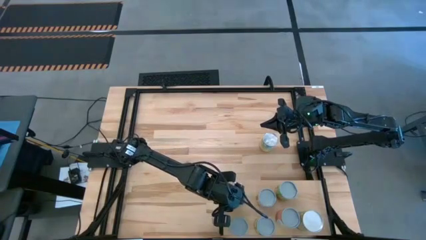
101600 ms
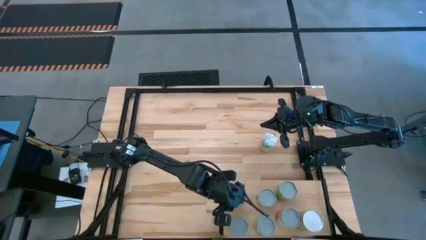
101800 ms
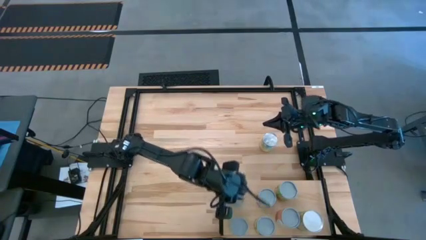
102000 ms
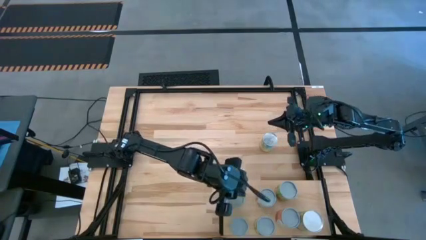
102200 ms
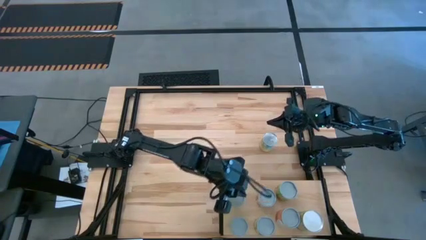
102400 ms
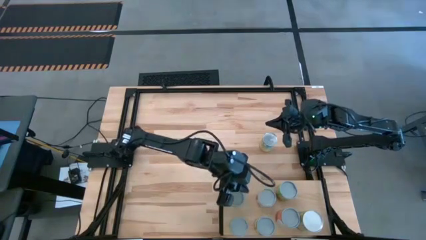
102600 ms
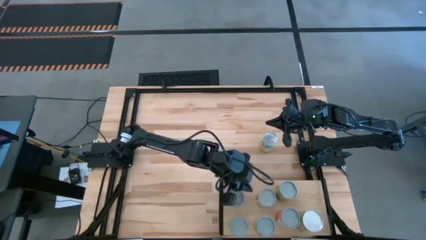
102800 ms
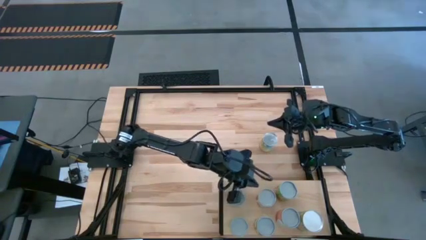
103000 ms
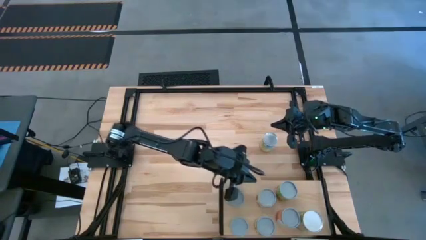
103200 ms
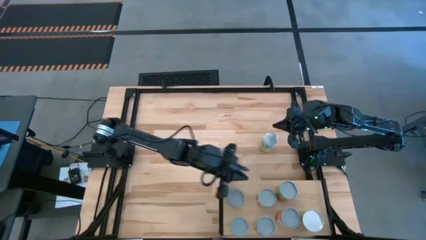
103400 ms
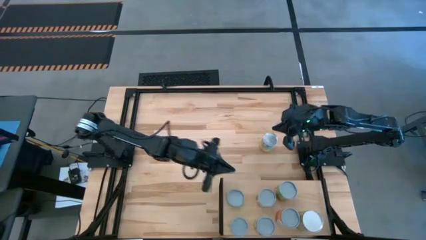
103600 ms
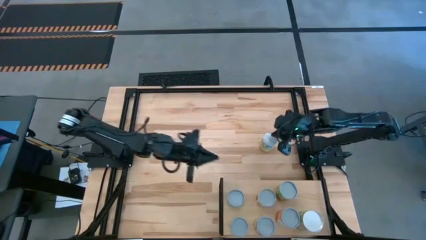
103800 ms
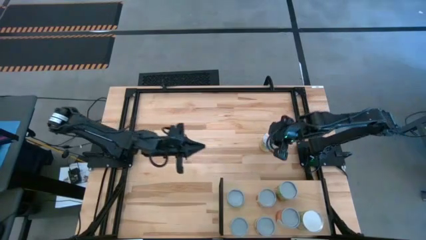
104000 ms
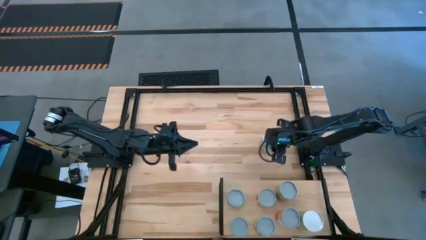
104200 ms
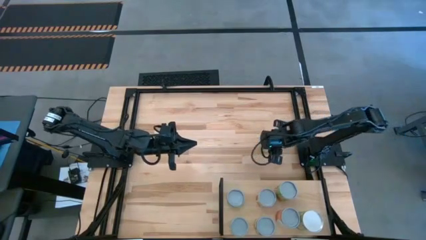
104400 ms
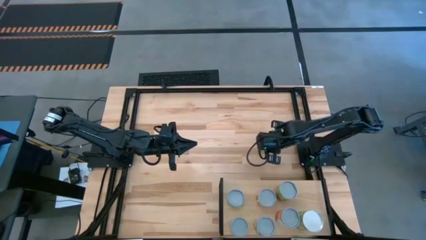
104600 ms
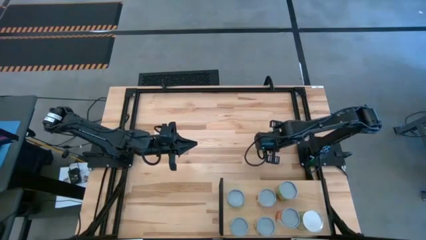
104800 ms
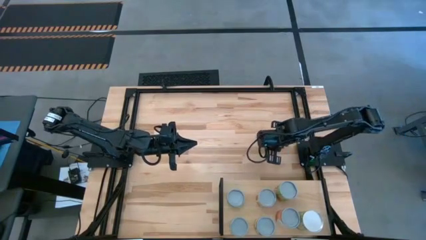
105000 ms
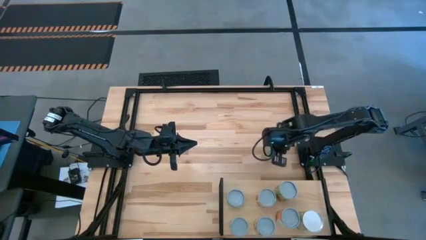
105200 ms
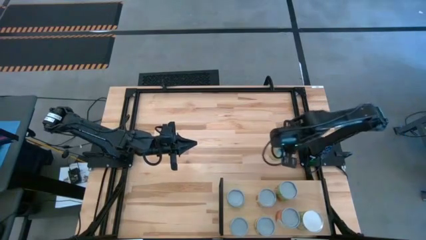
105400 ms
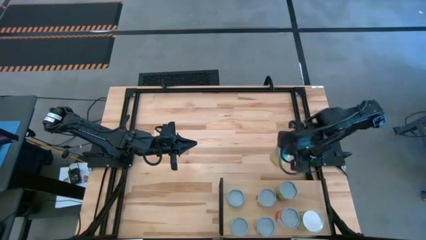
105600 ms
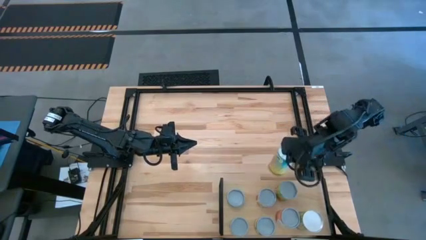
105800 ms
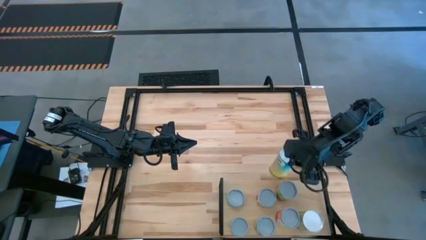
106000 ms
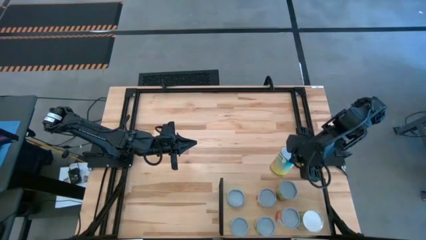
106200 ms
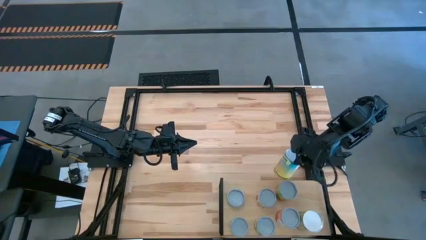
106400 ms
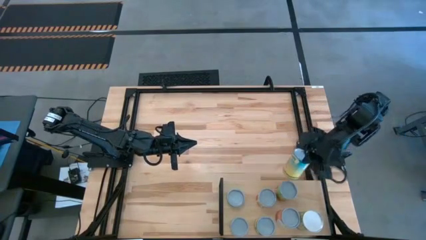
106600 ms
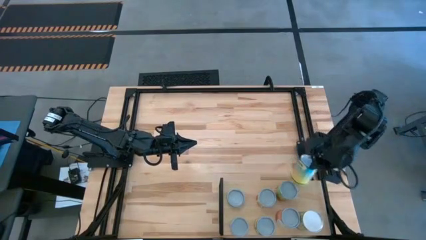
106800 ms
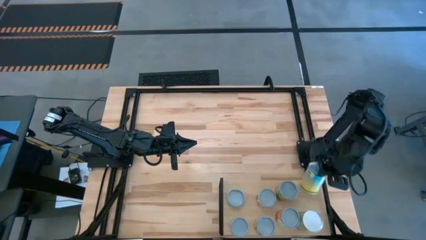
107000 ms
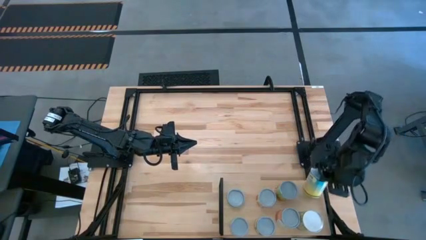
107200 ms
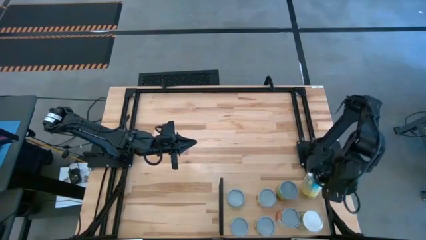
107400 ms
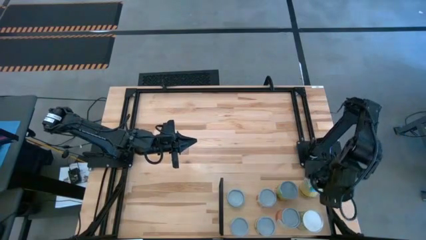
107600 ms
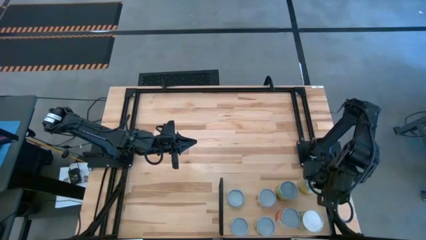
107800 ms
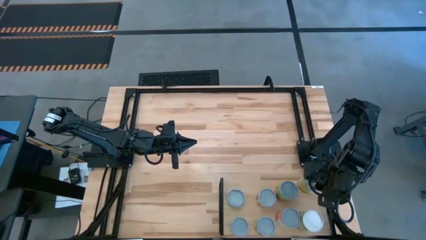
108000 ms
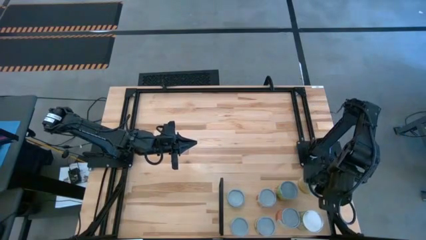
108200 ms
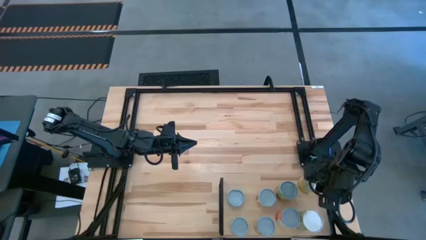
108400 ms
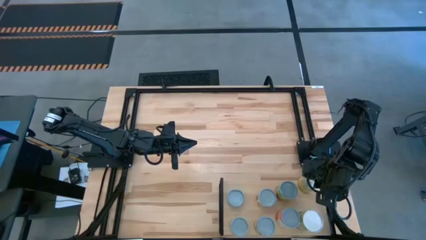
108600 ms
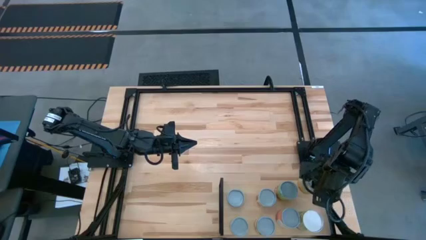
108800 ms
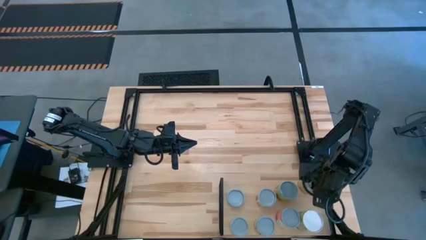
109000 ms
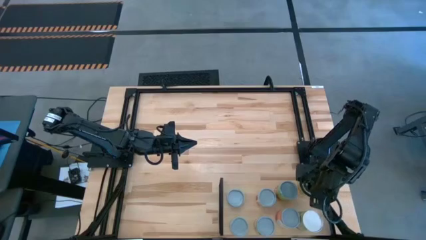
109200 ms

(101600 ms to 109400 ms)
Task: Pick and place cans onto a shelf
Put the large canned carrot on the shelf

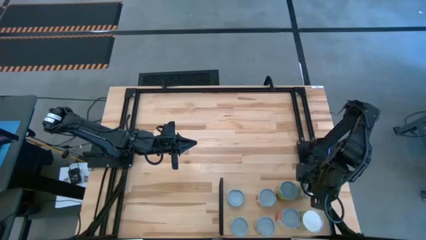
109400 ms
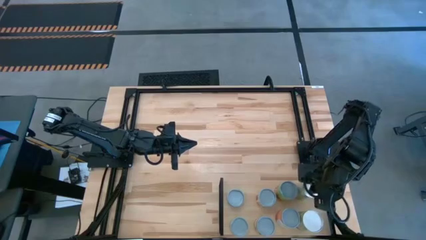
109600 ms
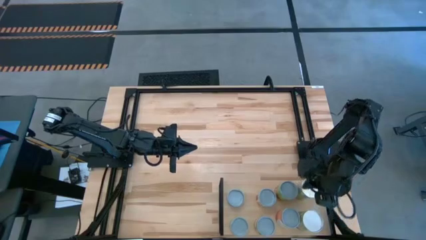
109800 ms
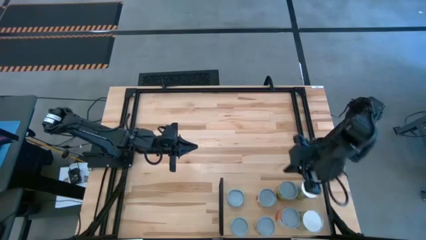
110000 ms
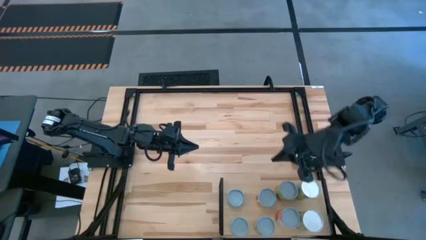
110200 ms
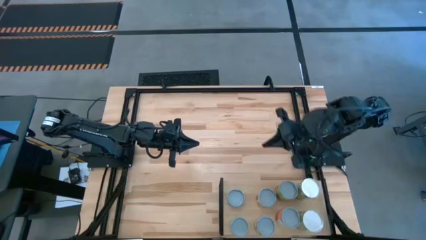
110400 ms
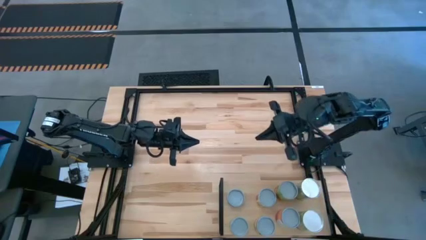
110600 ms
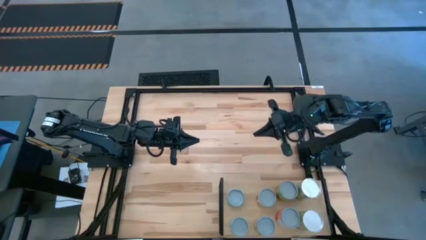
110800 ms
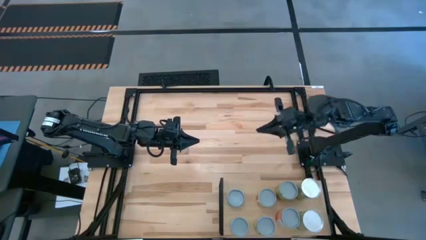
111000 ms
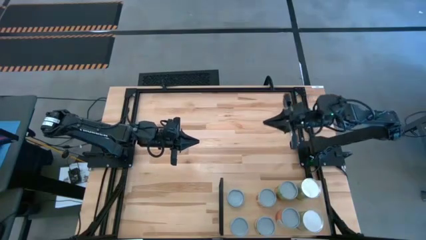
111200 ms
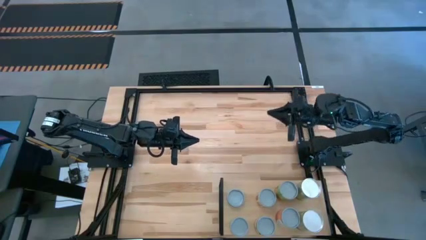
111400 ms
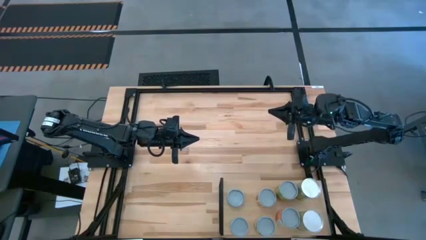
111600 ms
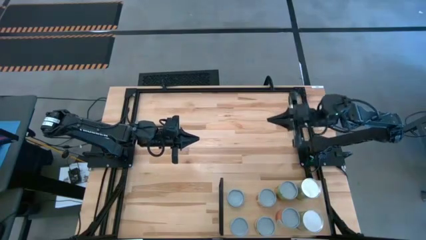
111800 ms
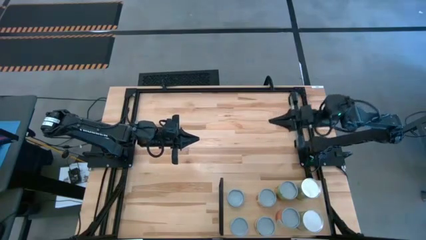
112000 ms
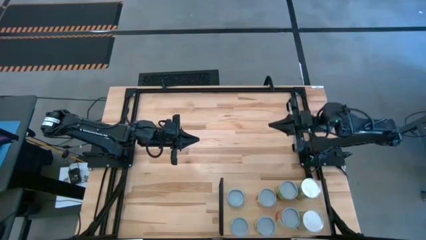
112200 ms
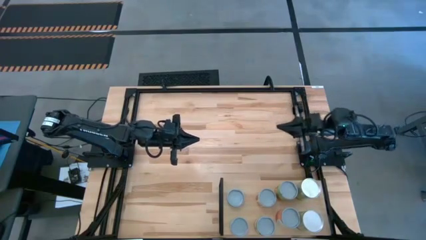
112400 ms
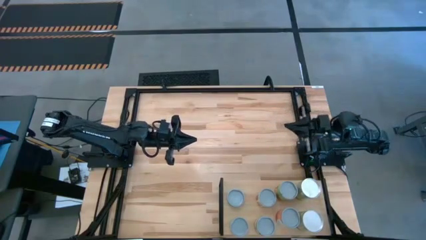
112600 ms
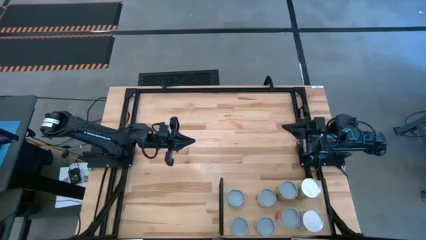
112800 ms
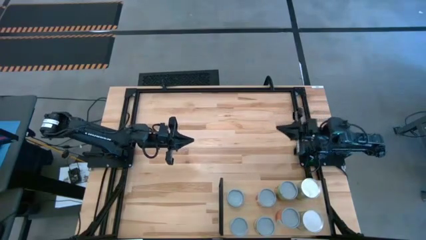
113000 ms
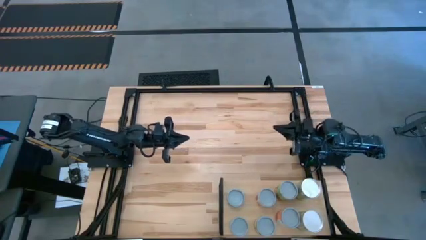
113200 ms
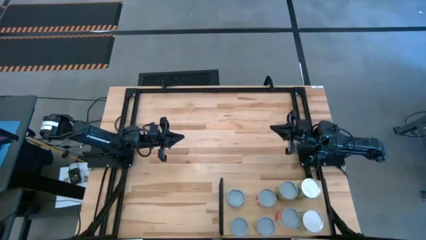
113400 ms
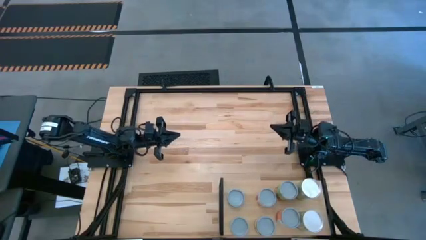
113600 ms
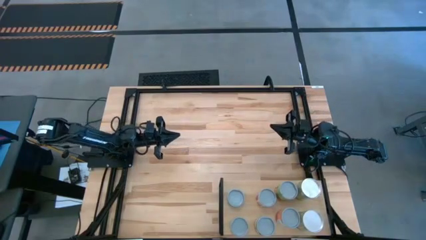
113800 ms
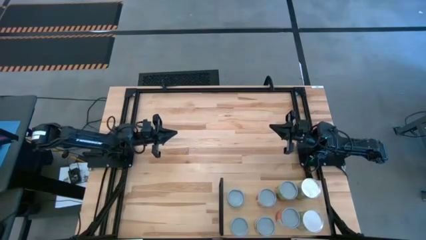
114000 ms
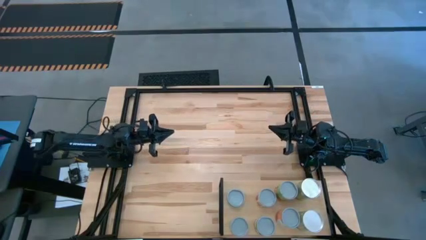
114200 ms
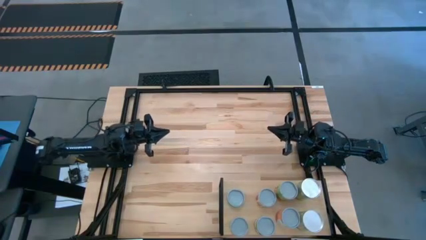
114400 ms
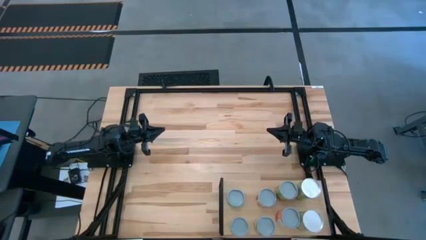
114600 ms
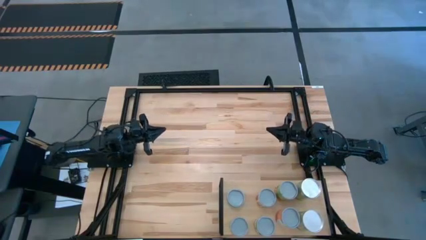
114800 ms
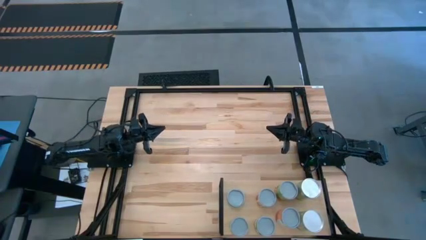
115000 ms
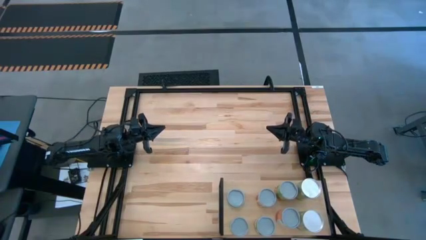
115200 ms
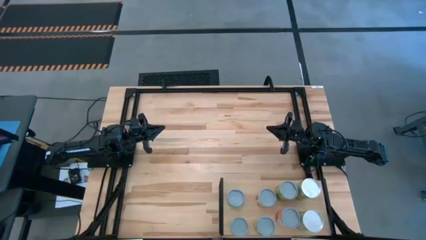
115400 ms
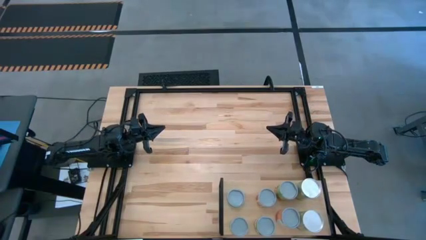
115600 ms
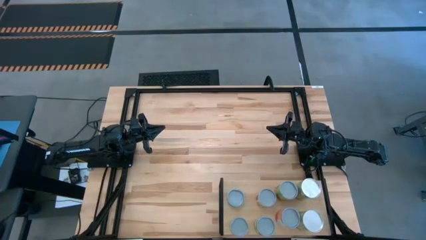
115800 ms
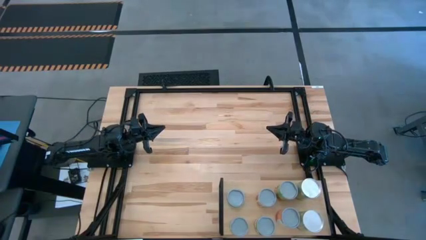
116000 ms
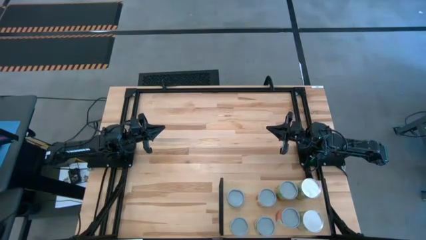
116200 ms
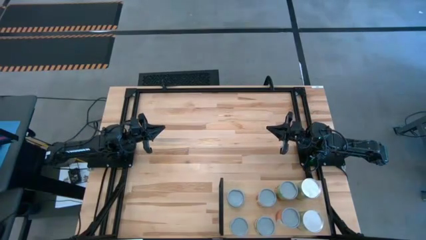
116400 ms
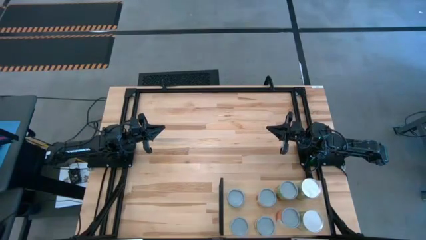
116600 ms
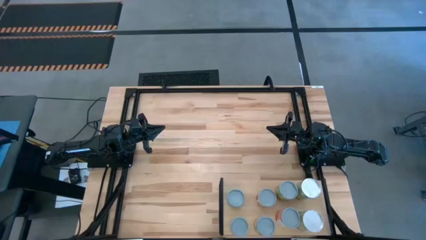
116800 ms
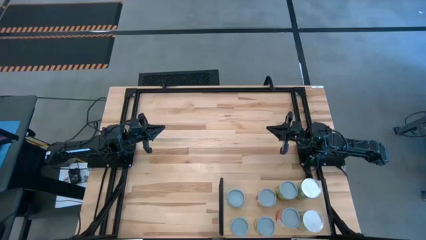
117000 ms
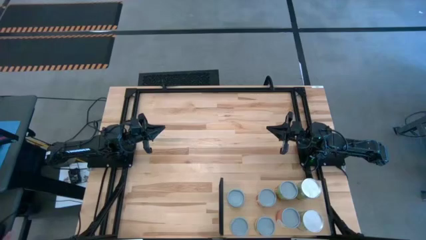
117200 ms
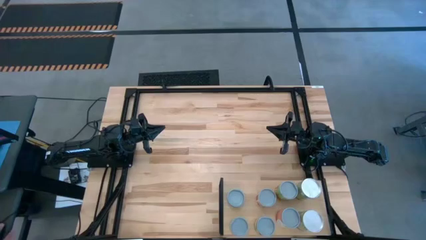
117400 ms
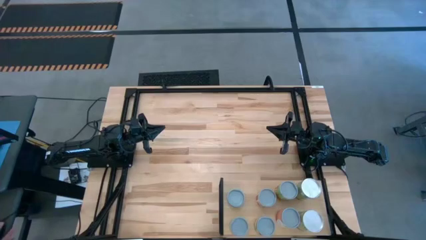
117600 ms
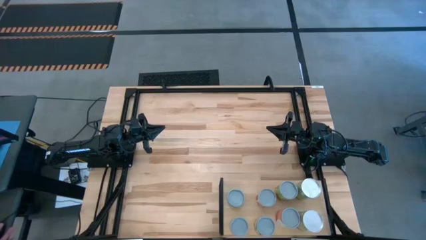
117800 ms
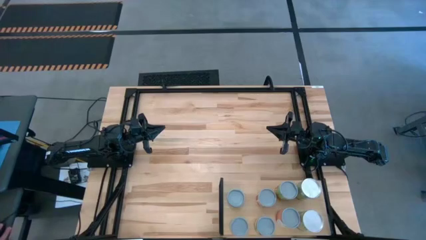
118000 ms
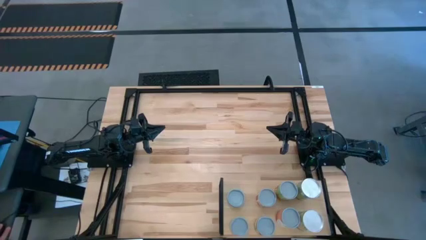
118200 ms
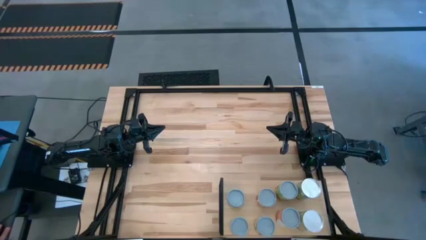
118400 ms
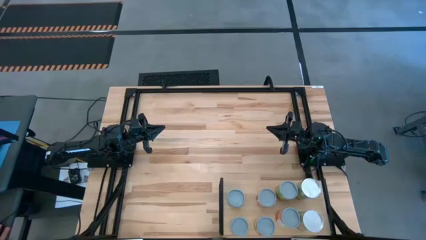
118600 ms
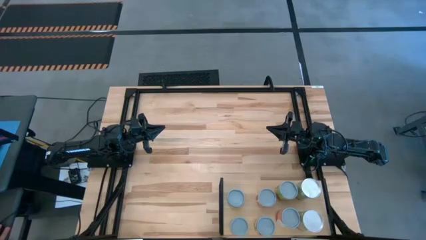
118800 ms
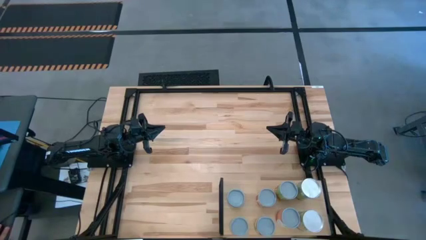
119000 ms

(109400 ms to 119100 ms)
Return to Home Position
